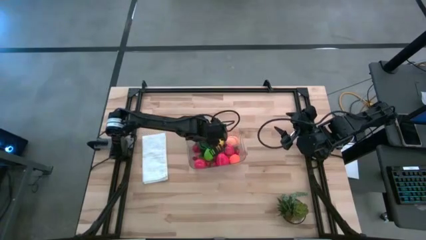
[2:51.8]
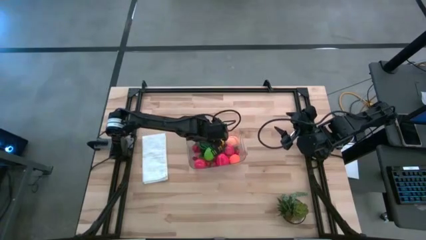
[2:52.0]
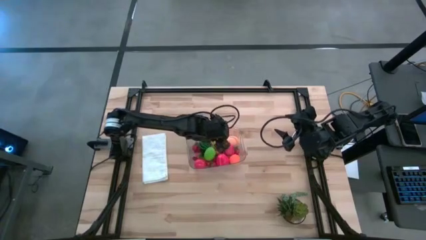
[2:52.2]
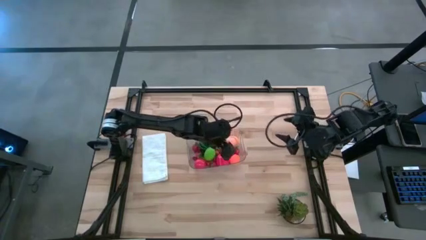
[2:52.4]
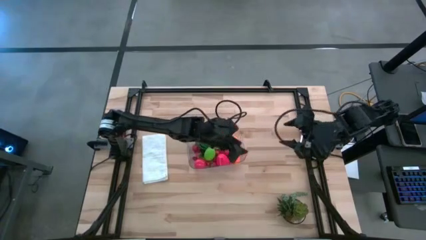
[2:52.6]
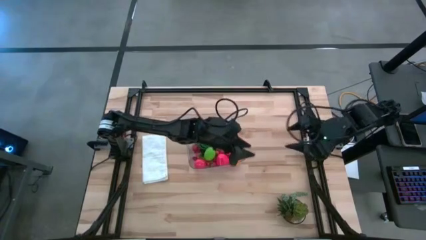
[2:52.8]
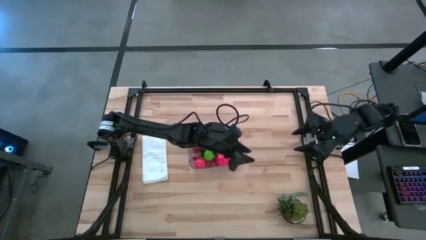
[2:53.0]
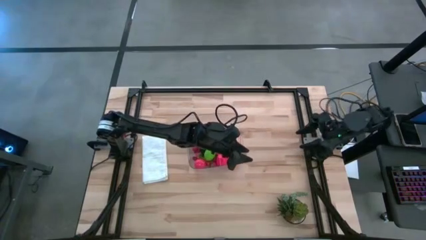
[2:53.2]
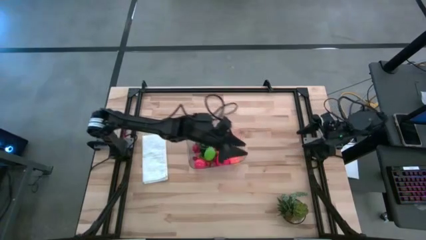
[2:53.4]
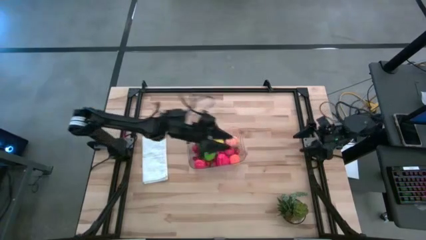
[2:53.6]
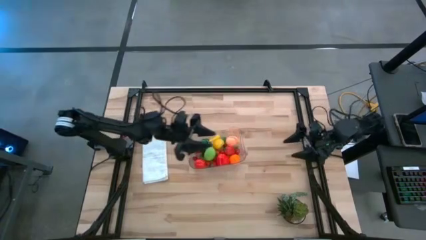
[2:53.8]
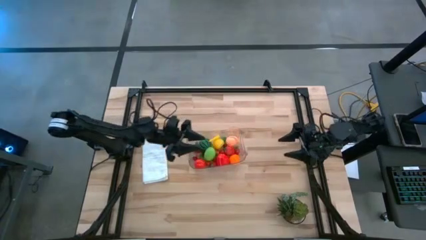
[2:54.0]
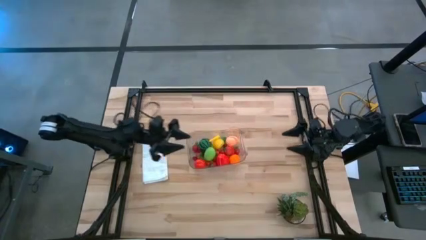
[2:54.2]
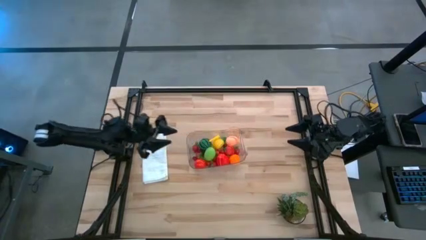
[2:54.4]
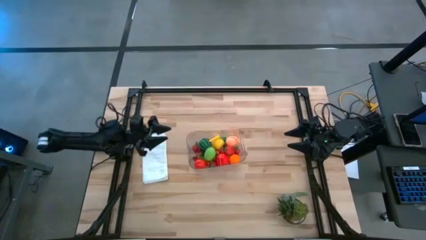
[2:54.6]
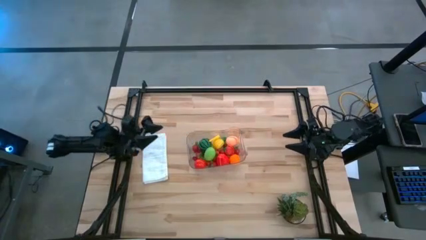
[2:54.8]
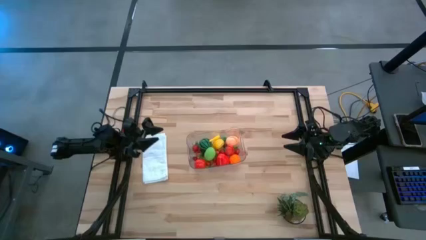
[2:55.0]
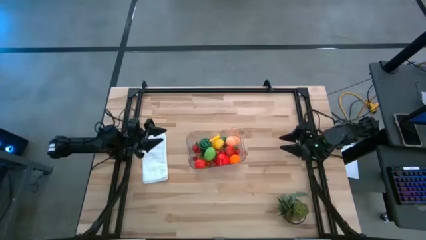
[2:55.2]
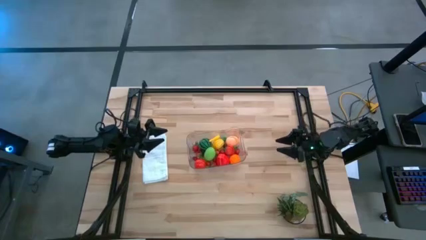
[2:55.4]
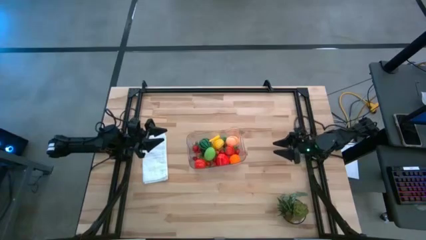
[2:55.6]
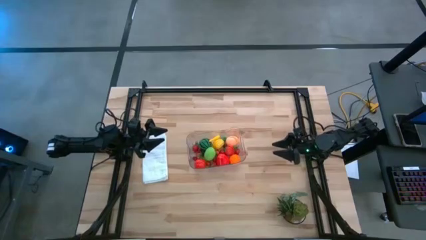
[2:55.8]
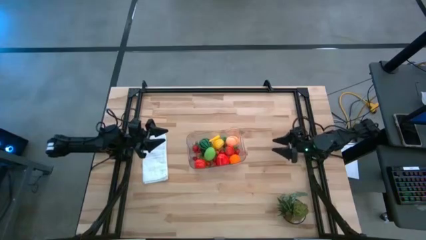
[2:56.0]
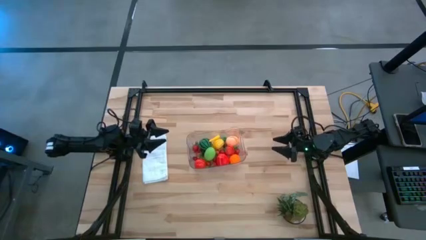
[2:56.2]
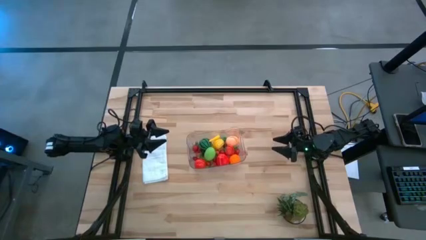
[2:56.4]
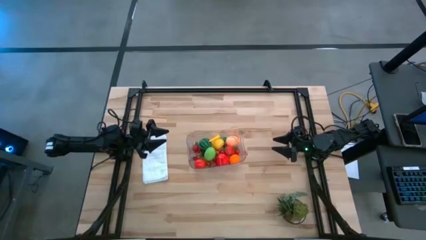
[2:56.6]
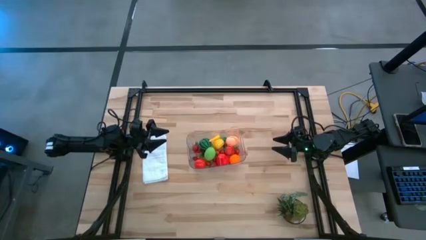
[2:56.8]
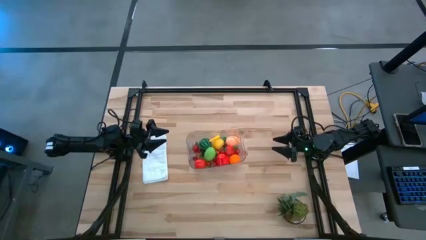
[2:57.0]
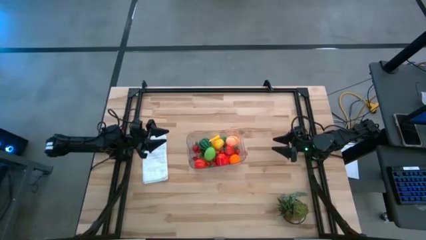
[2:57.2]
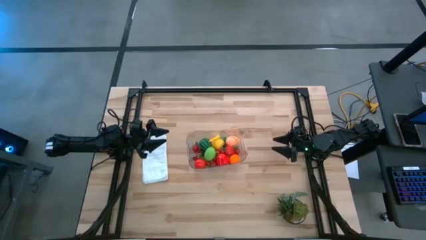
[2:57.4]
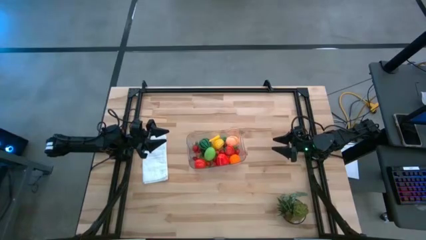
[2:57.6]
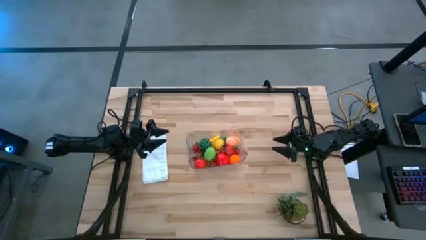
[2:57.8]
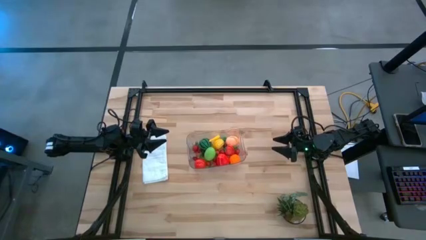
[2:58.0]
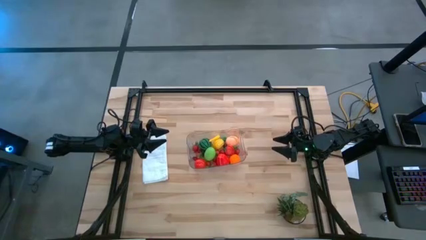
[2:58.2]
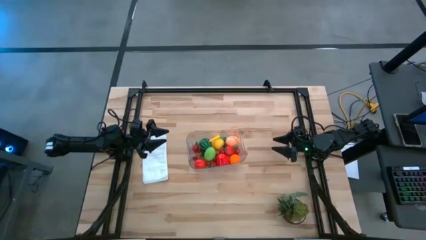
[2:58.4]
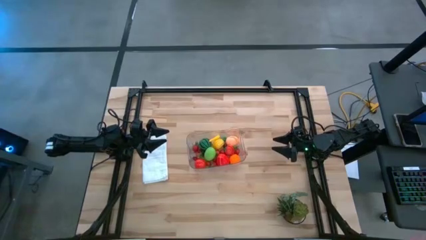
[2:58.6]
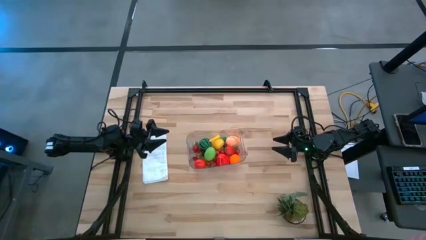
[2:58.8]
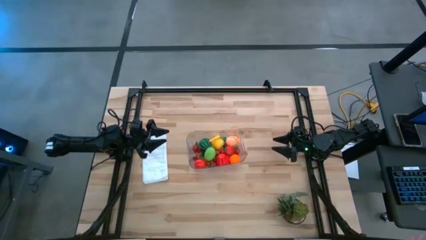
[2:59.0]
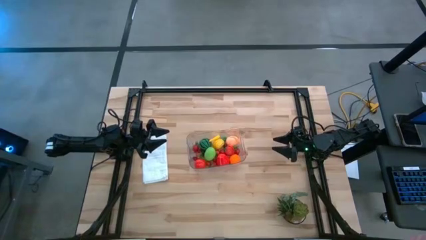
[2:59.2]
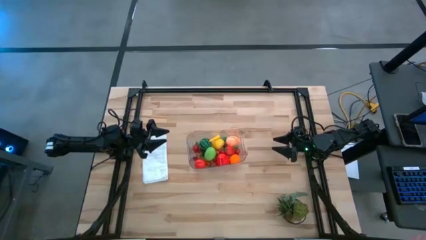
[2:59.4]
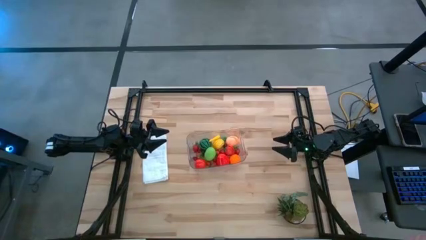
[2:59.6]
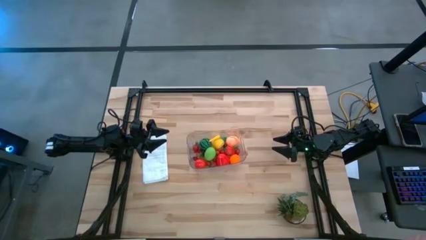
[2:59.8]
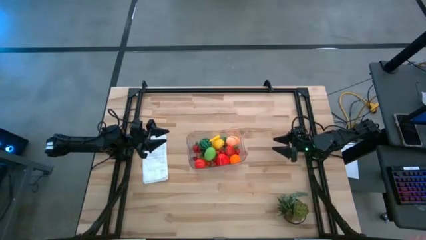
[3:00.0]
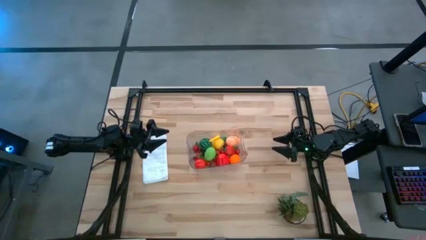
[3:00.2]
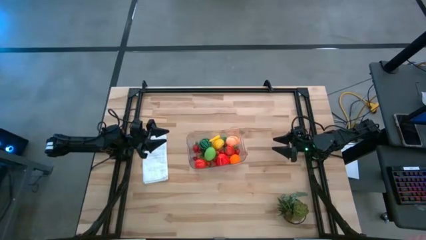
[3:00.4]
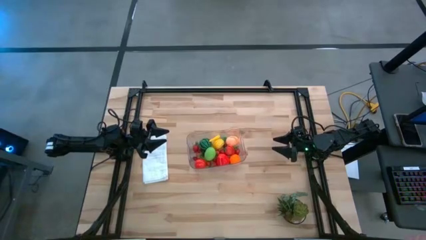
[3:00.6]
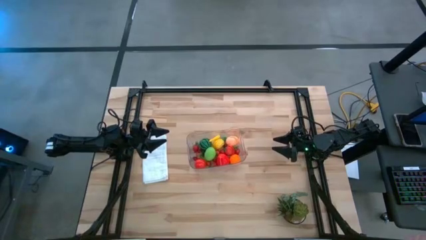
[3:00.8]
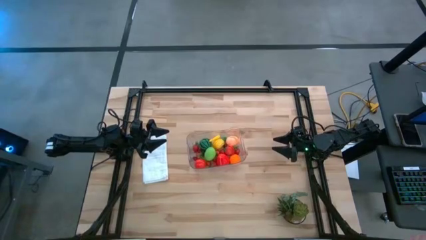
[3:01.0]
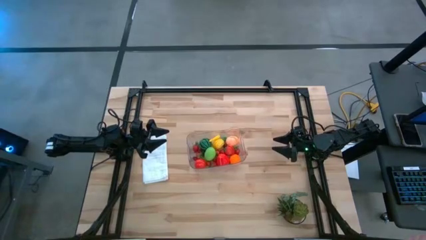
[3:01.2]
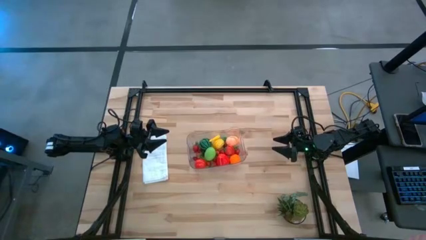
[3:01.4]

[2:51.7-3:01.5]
Task: Pick and placing Produce into tupperware
Return to Home Position

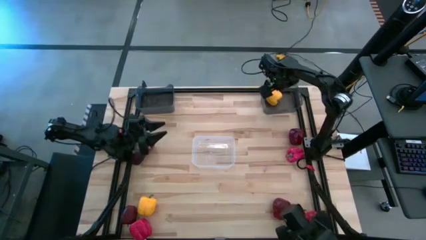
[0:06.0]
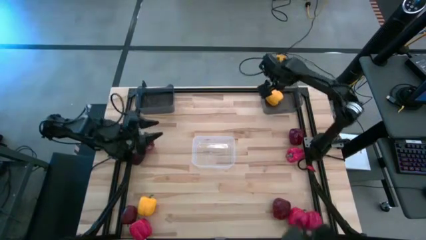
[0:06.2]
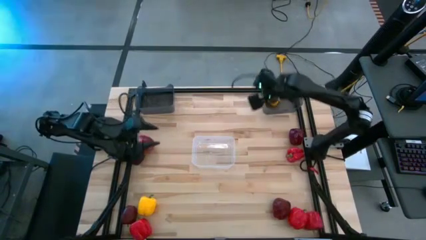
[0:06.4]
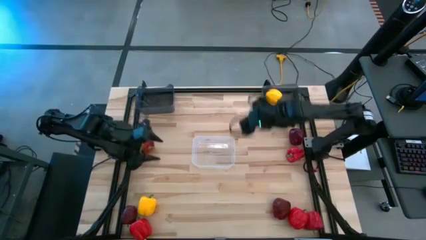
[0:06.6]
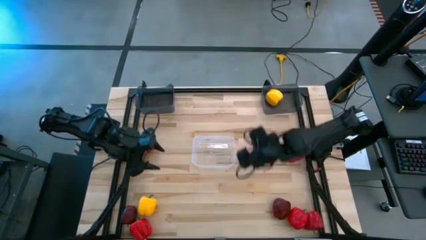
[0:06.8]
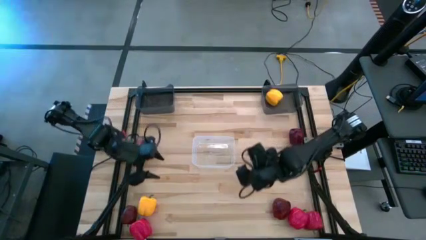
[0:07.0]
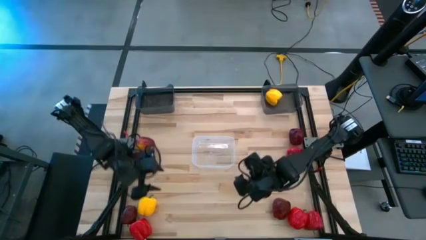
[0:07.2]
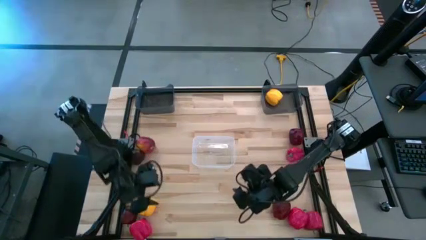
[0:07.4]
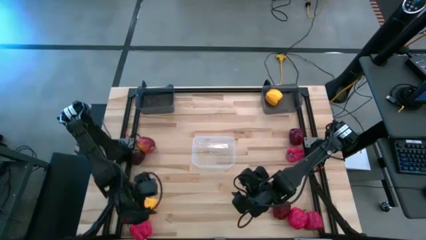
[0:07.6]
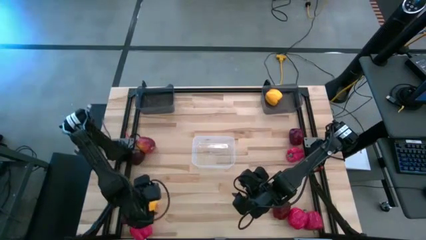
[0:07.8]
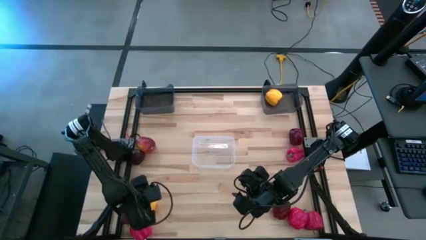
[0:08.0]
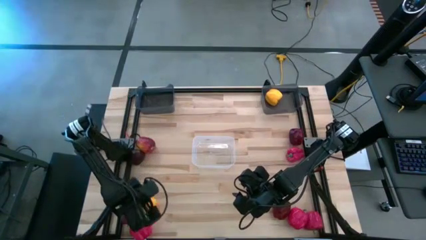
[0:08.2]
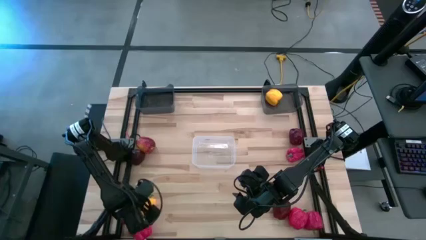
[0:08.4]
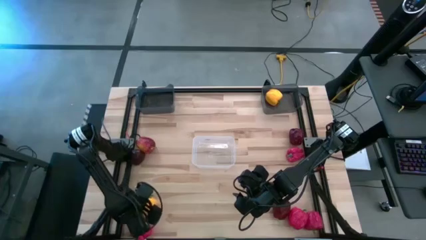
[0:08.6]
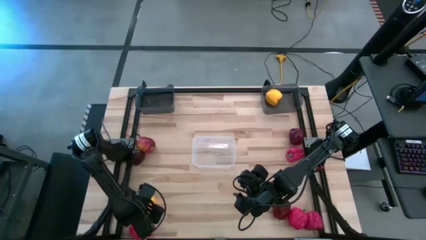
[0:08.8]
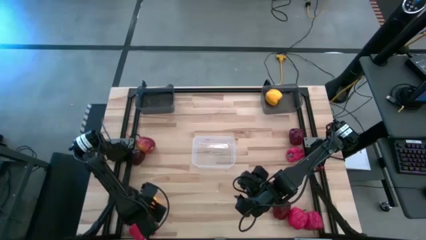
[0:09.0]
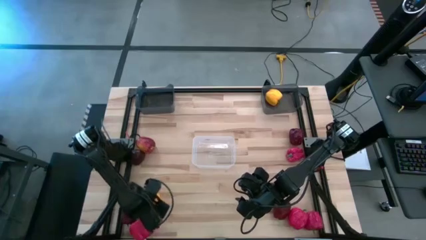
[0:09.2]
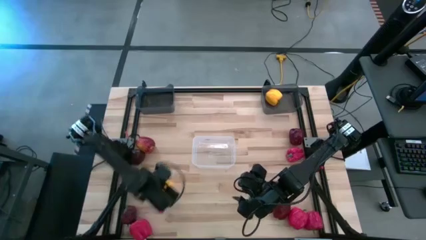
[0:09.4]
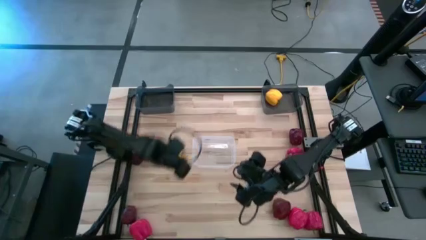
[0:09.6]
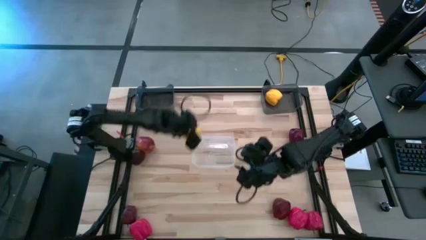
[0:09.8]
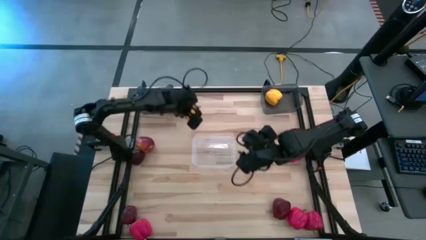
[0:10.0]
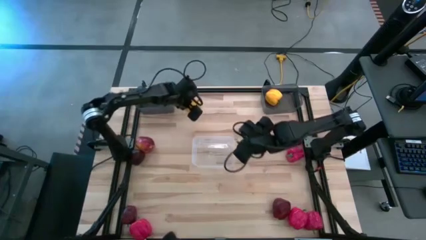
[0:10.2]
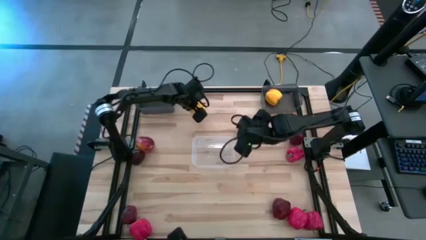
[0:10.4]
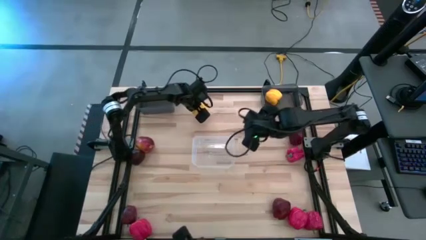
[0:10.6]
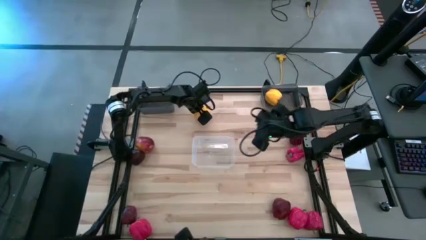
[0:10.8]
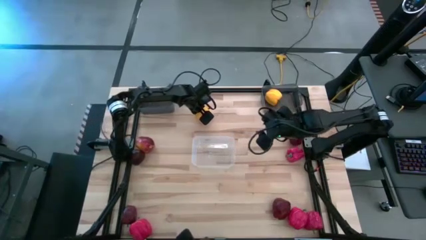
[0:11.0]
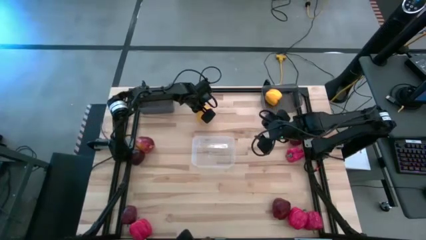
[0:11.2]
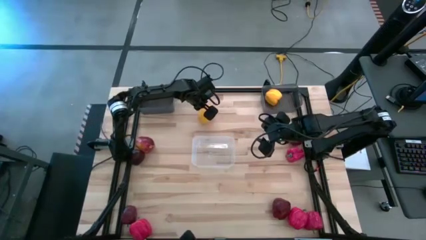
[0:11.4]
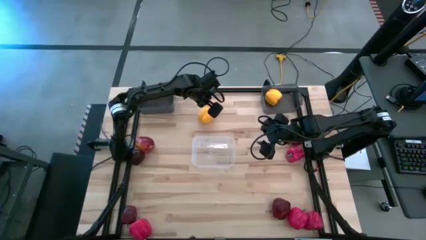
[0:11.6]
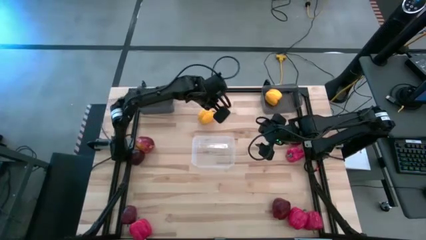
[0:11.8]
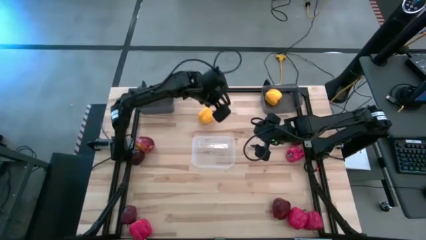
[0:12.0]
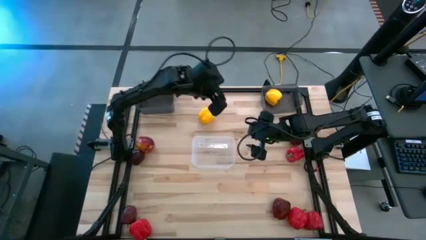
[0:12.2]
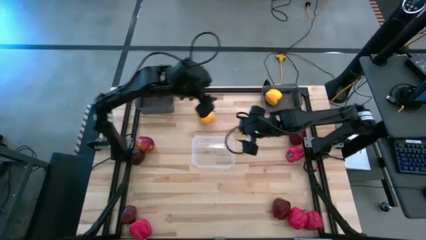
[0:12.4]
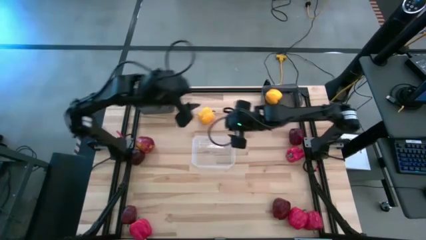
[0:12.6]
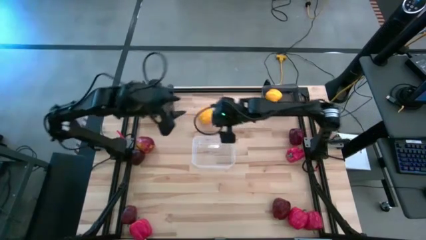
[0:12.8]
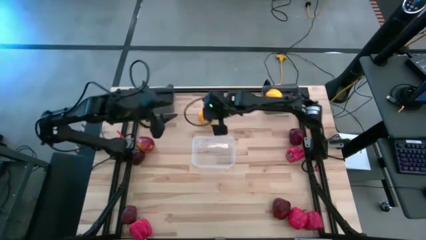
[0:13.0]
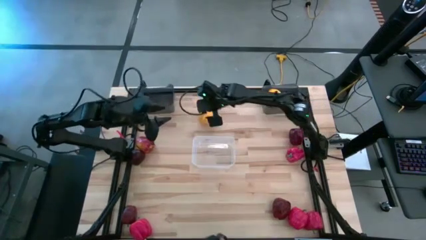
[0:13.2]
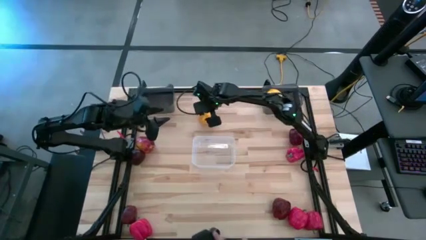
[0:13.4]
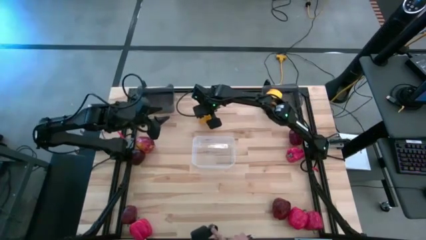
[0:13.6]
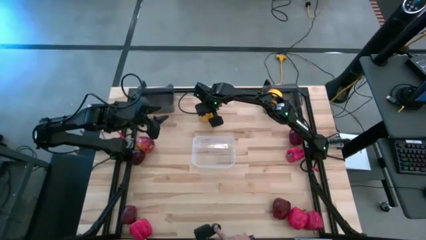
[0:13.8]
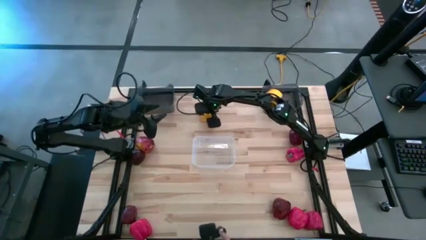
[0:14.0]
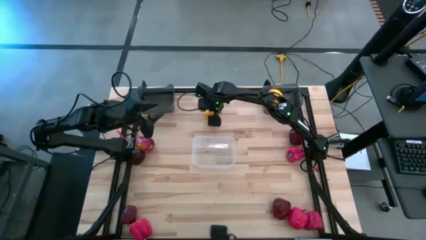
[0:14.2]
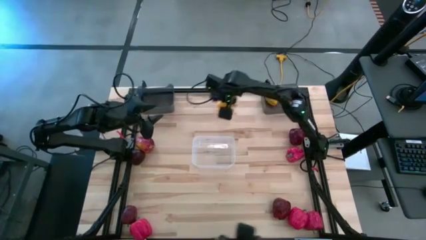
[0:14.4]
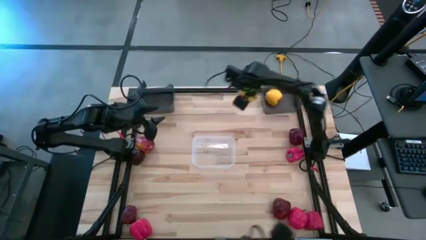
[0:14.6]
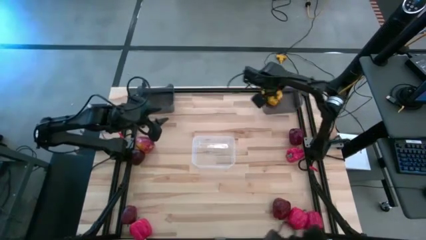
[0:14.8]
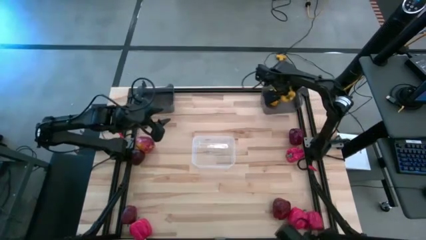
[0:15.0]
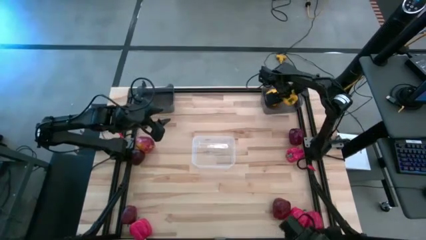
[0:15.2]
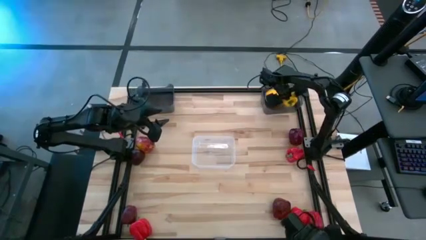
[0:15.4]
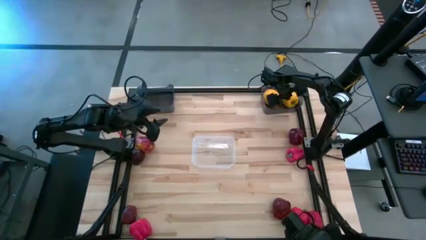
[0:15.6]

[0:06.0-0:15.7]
Task: Sort produce into baskets
Put the yellow bell pepper into the right black bin
